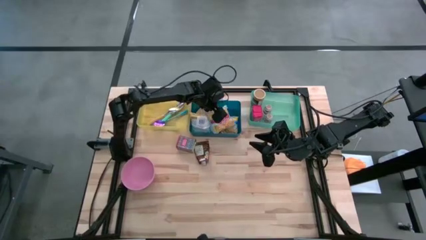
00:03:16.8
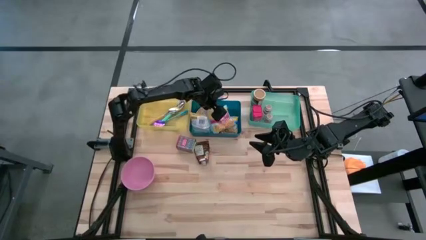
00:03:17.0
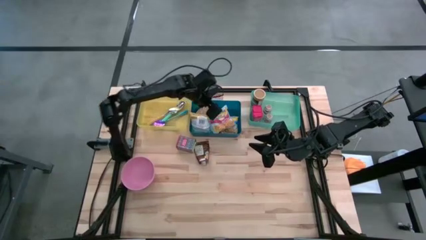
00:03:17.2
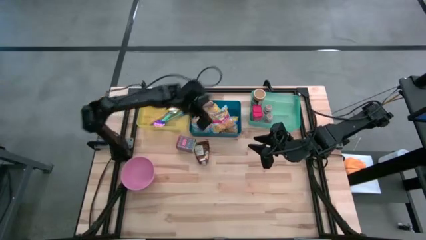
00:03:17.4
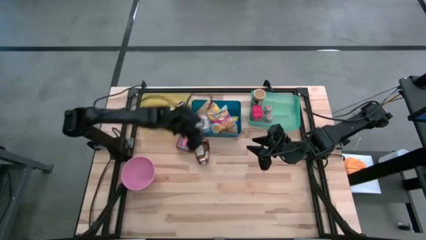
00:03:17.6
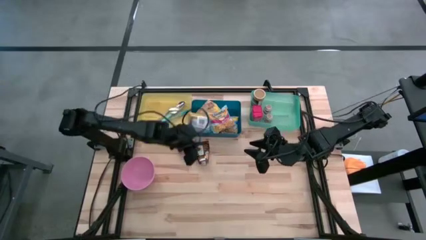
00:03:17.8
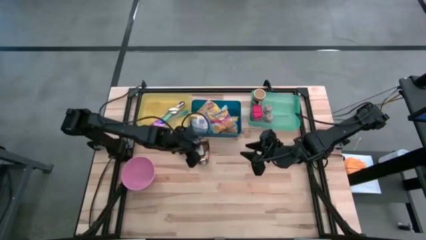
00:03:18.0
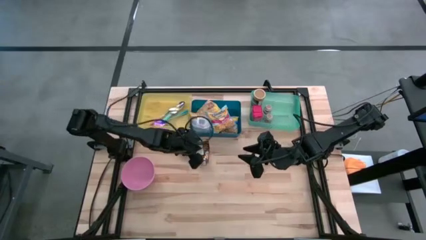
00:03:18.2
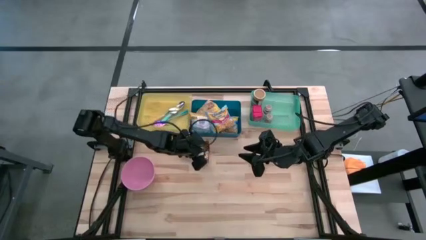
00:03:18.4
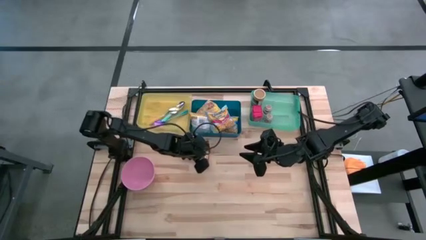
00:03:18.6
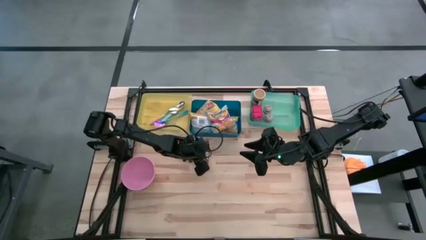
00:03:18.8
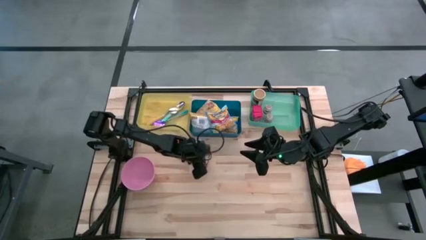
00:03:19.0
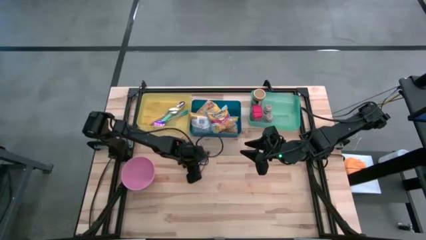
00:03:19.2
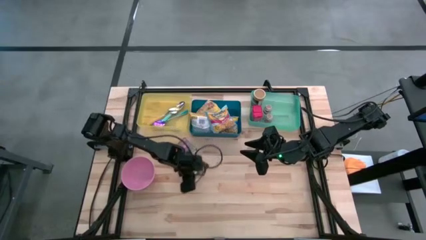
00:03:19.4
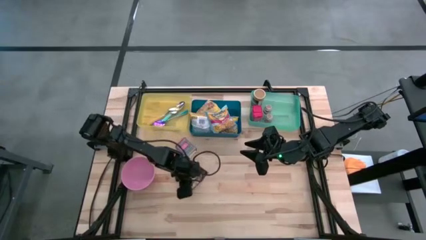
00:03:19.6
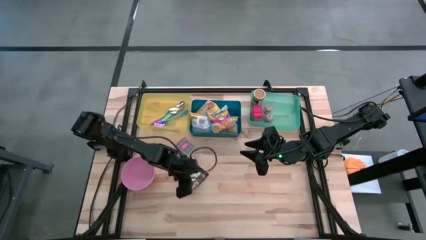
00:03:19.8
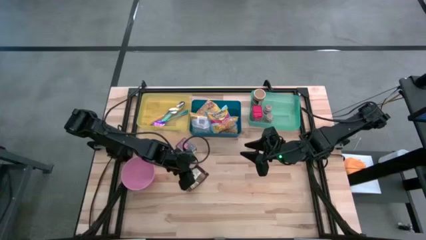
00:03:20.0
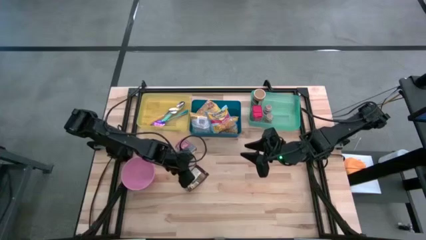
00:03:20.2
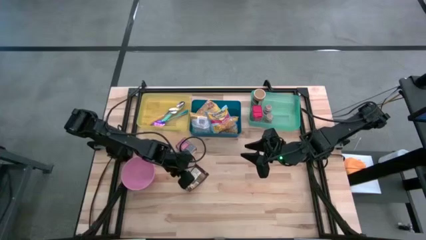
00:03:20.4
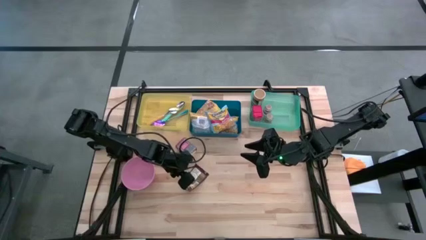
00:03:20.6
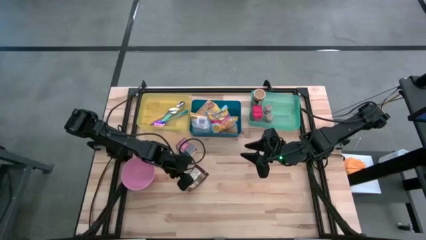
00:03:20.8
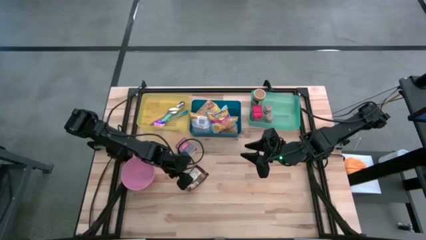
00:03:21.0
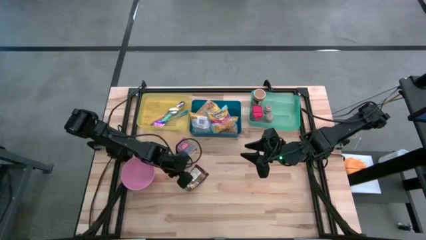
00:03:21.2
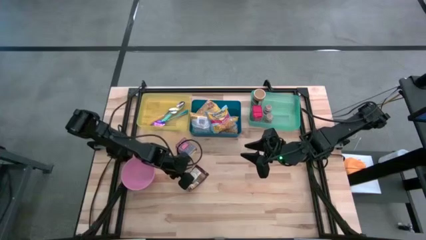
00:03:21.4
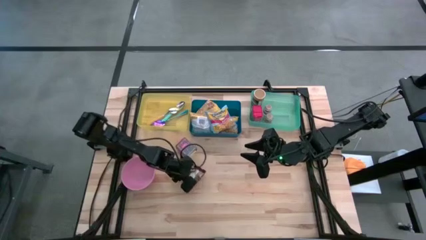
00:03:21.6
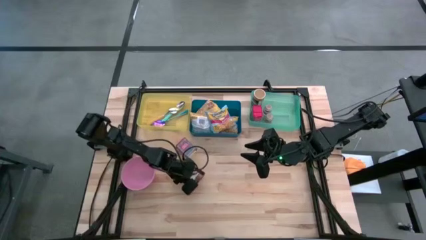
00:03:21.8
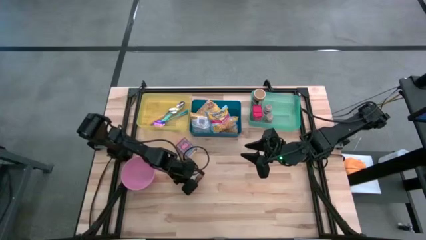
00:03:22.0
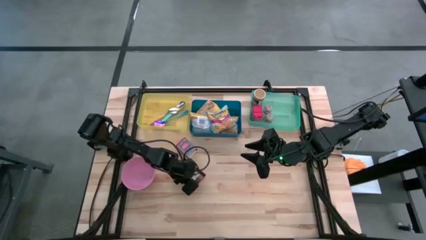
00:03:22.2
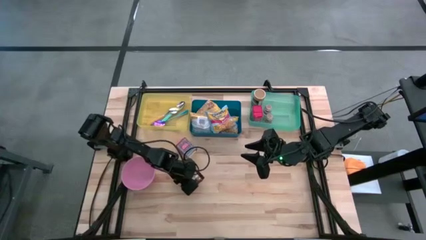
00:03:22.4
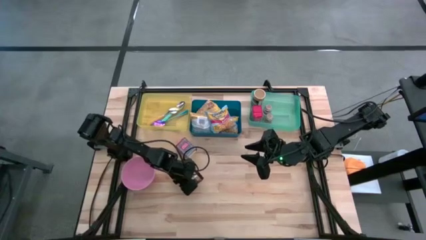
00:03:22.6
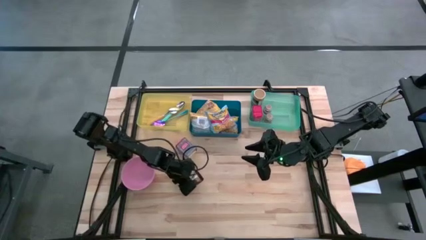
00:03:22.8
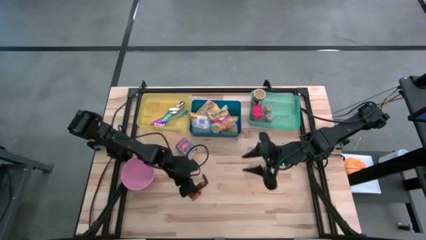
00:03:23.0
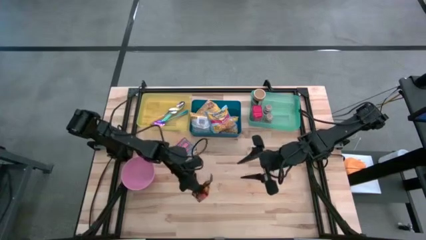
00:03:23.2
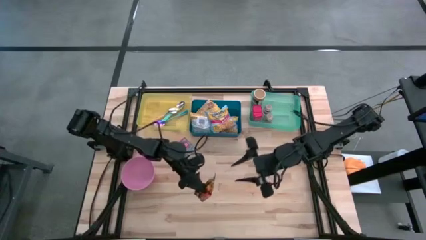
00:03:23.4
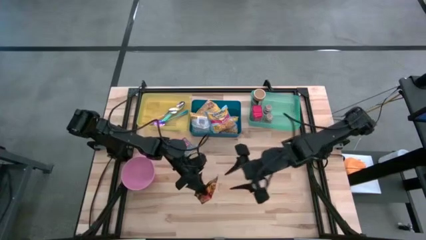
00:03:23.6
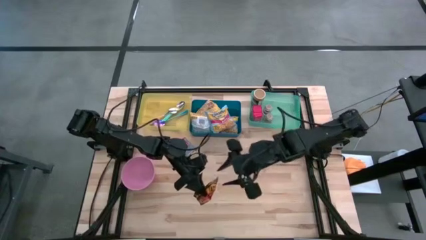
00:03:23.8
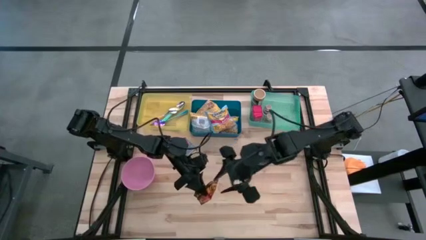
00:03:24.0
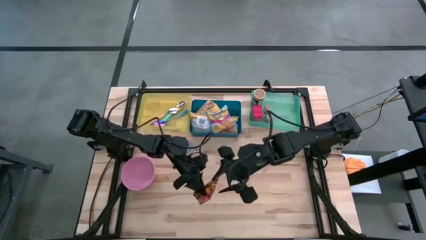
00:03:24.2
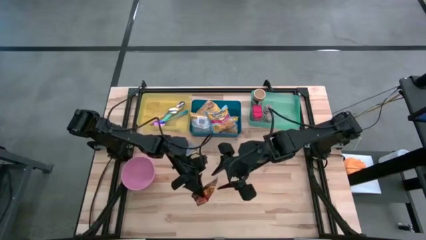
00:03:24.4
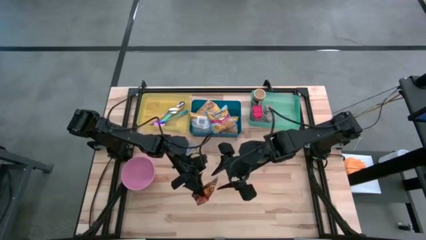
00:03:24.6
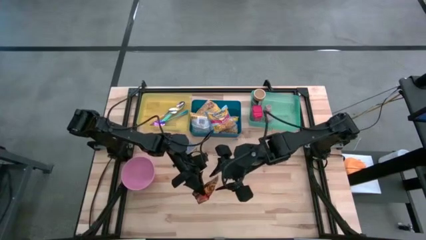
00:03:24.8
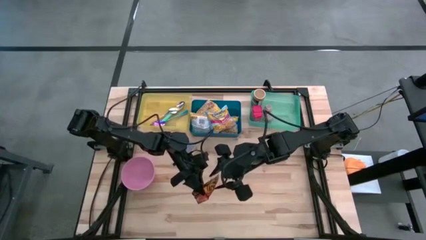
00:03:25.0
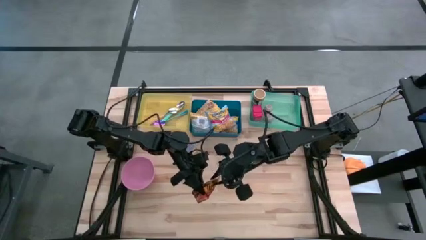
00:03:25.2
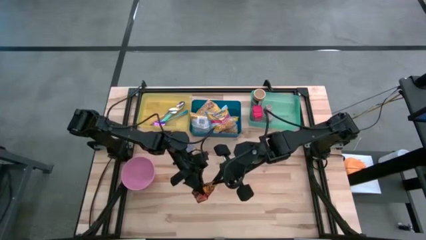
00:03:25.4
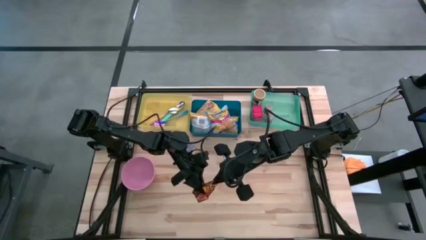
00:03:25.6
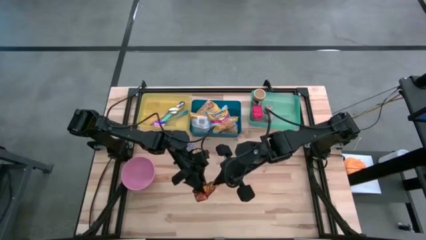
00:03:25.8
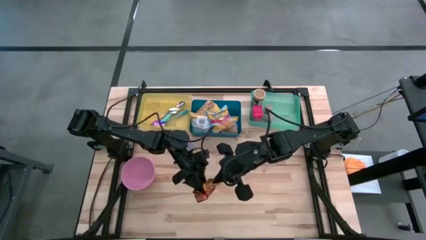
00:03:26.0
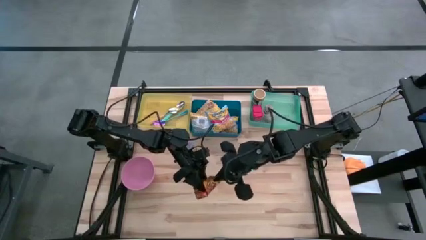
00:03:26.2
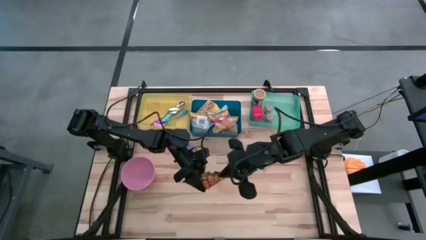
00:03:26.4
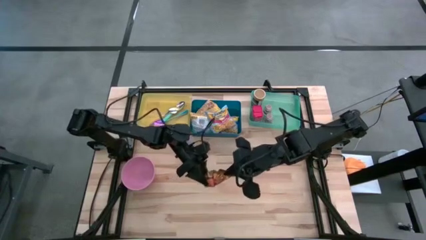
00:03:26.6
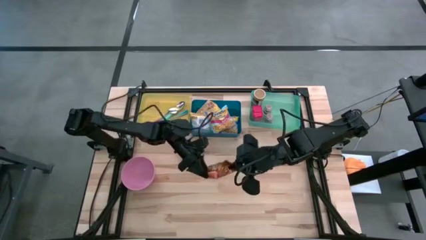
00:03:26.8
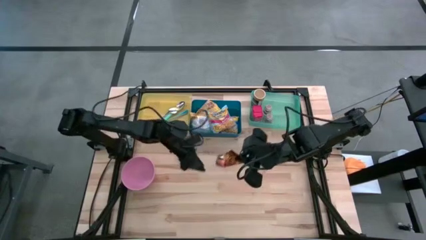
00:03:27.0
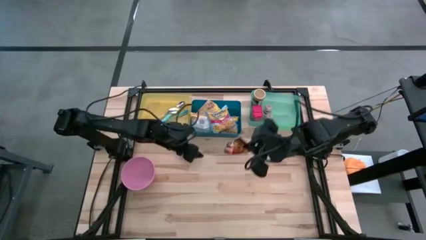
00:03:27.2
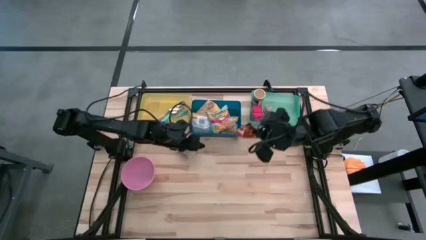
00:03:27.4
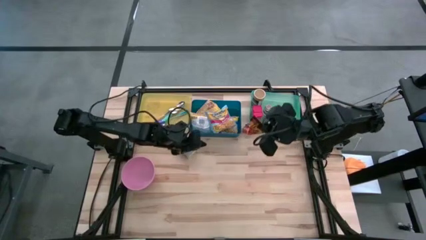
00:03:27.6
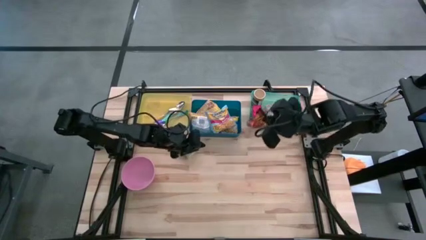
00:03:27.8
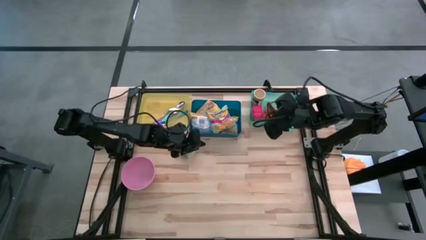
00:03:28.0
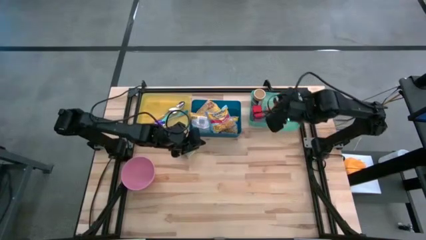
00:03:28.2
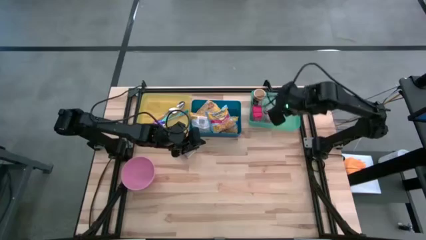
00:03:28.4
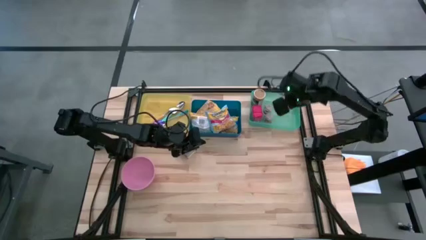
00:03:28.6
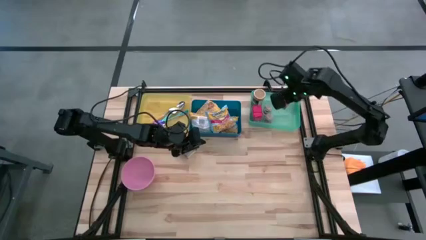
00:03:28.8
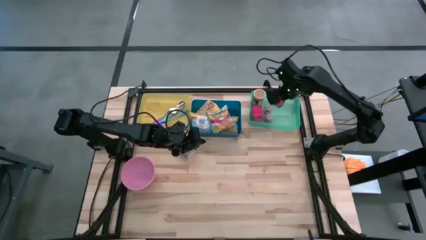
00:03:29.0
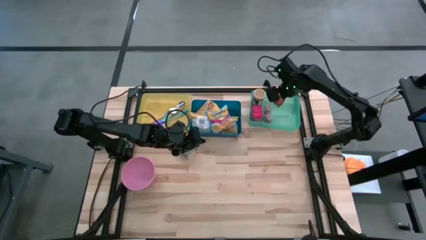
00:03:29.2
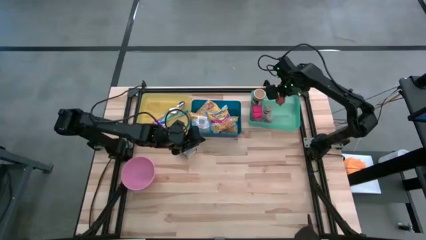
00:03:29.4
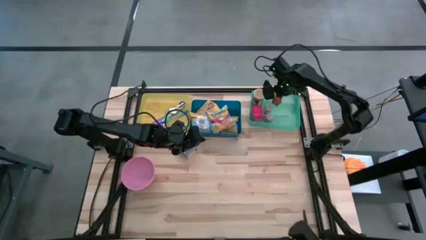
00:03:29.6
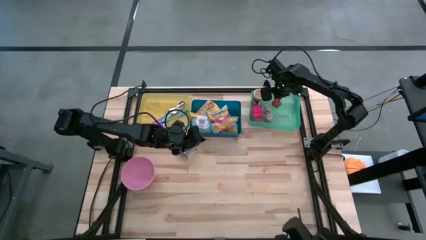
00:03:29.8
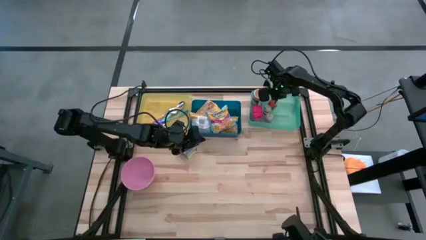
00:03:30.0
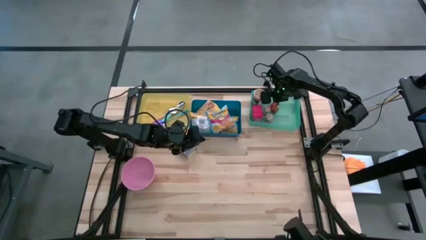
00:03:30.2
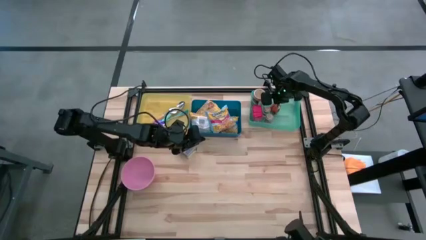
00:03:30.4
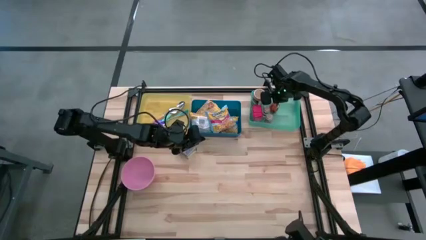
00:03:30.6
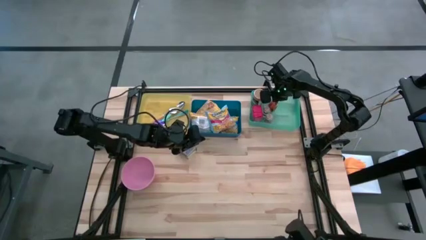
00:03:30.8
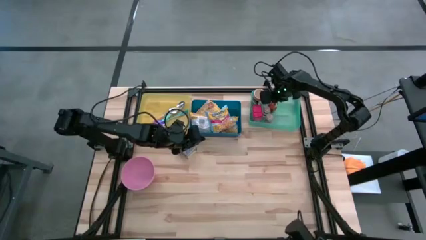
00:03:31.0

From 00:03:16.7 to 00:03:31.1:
Put the orange seasoning pack into the light green bin

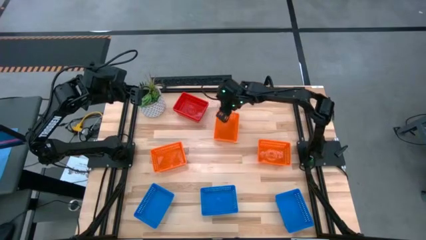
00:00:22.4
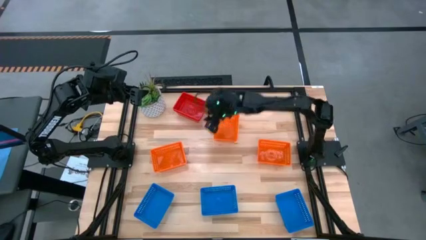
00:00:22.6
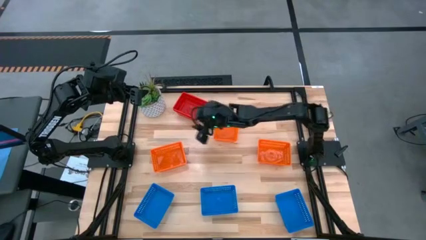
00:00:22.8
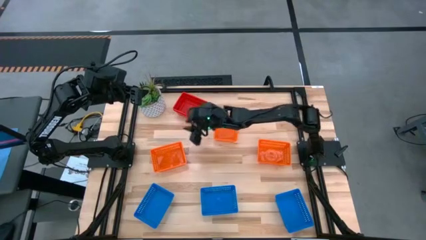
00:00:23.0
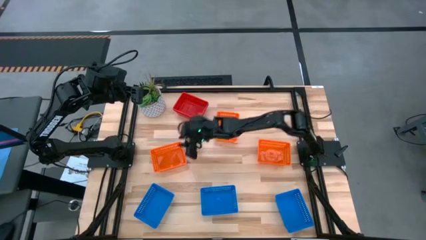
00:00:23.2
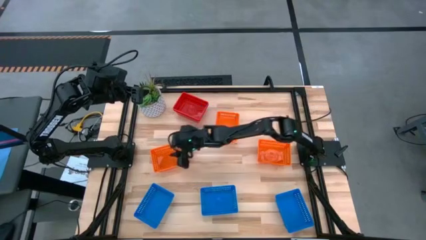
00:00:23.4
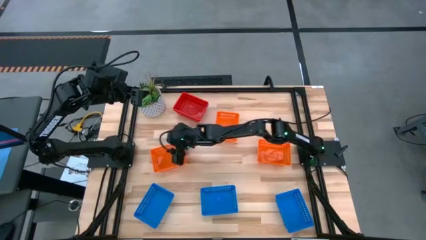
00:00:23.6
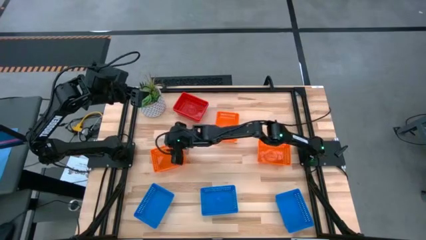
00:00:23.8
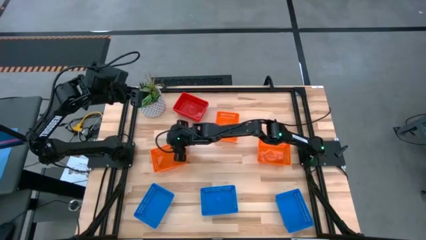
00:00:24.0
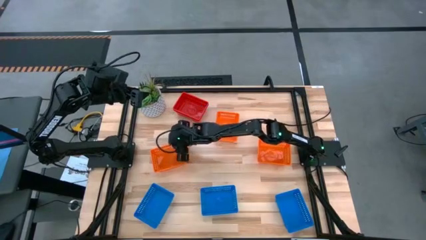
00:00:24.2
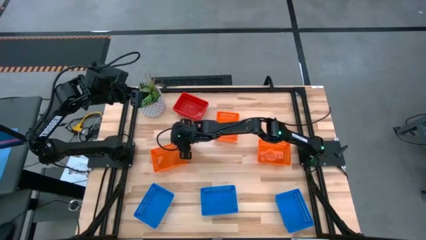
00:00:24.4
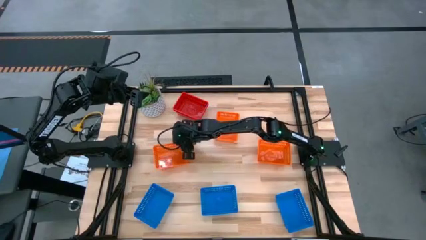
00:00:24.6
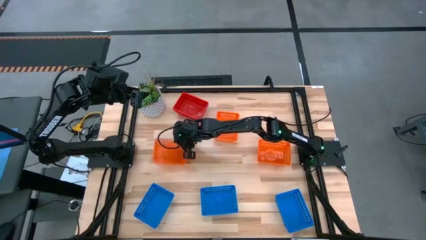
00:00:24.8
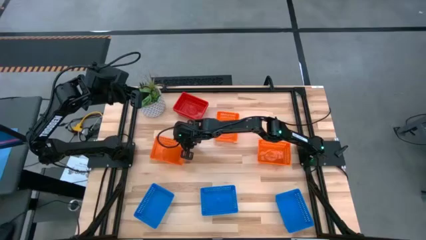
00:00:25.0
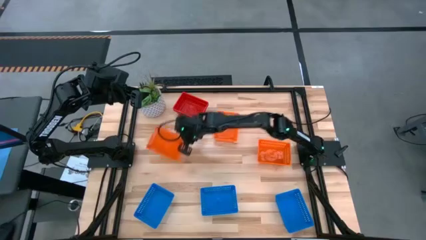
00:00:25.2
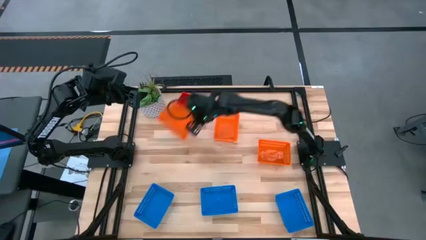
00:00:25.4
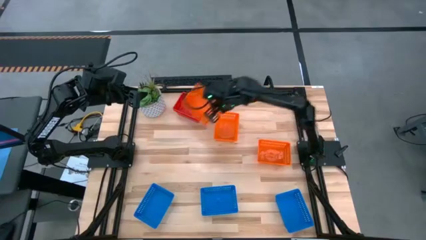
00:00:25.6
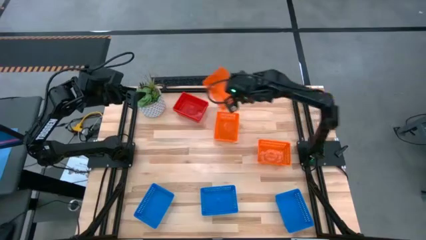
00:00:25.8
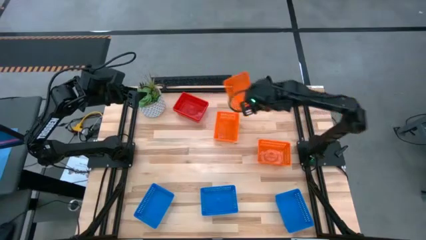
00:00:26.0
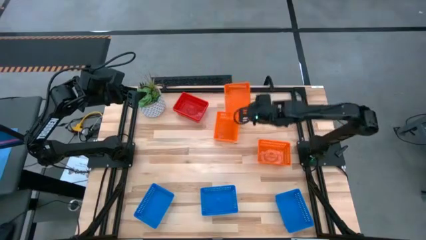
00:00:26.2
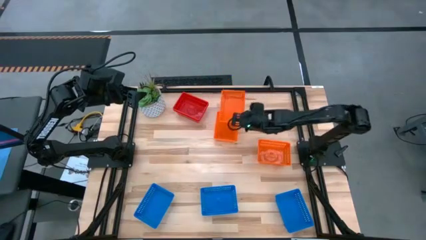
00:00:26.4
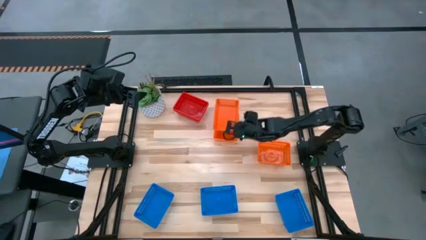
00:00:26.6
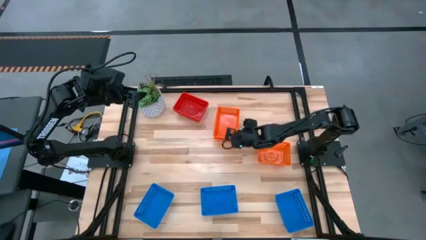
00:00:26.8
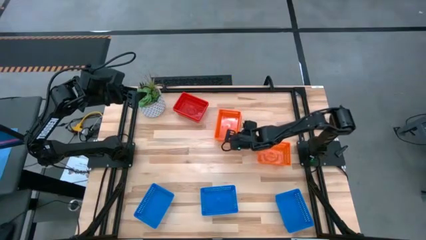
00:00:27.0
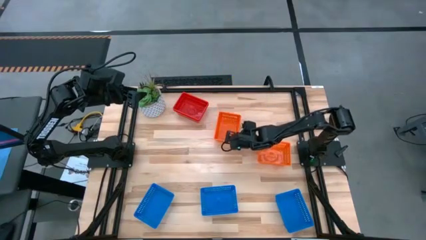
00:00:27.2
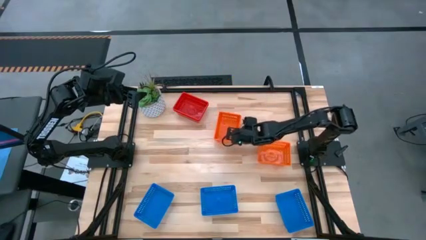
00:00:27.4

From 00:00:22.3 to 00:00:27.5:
Stack the left orange bin on top of the middle orange bin
